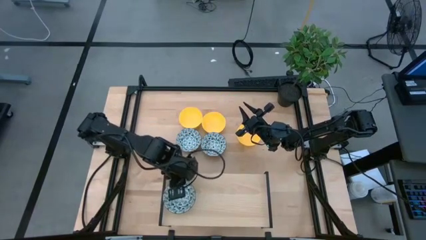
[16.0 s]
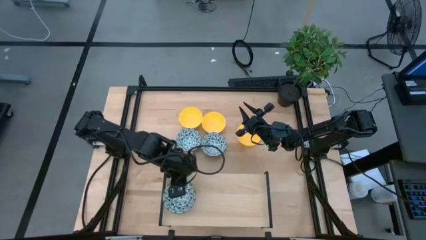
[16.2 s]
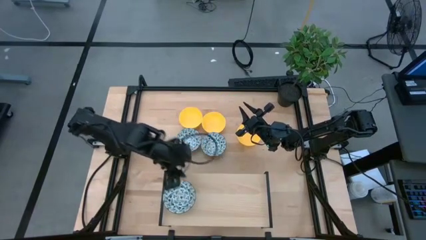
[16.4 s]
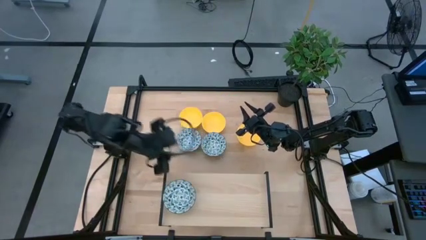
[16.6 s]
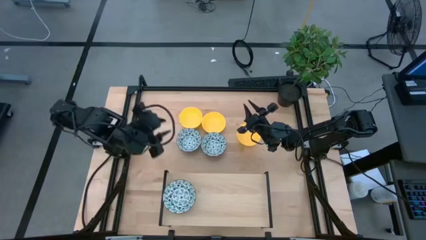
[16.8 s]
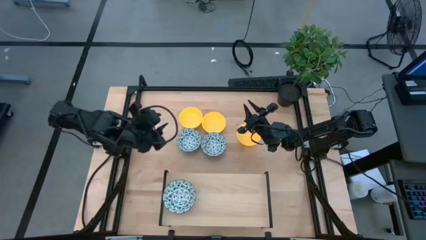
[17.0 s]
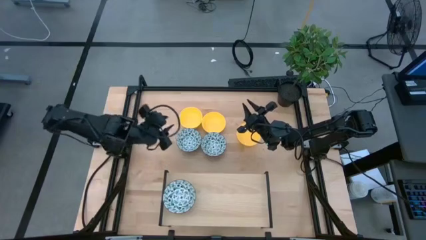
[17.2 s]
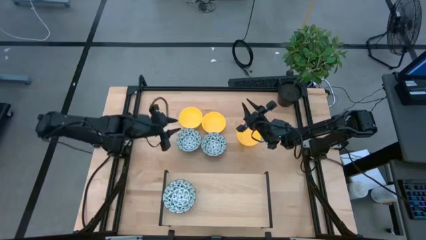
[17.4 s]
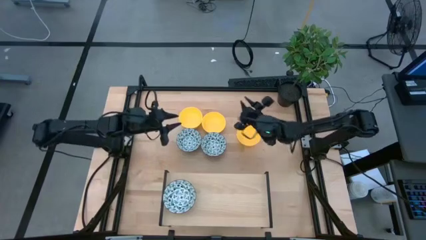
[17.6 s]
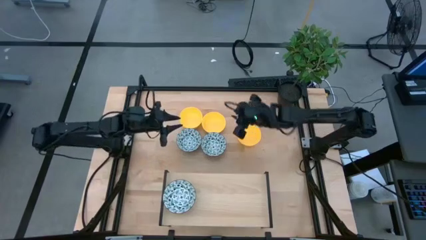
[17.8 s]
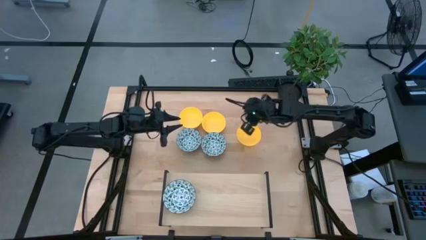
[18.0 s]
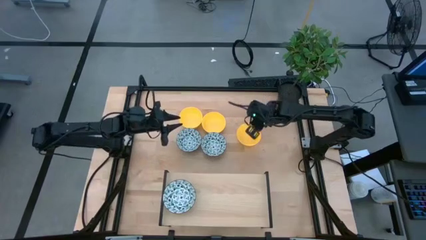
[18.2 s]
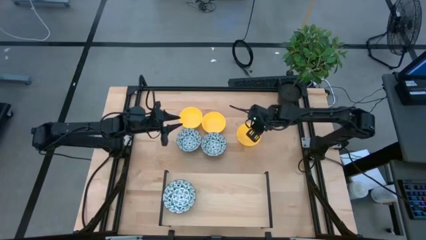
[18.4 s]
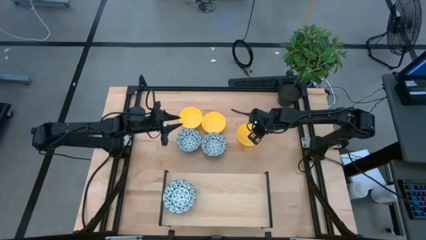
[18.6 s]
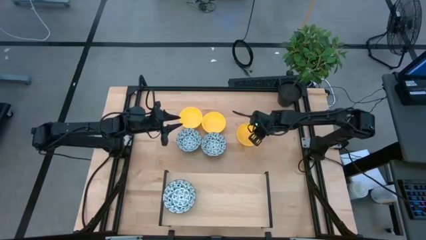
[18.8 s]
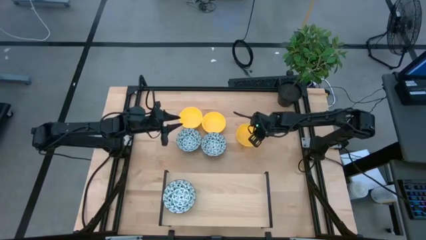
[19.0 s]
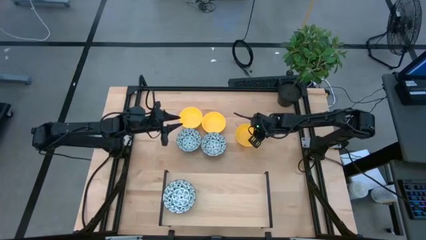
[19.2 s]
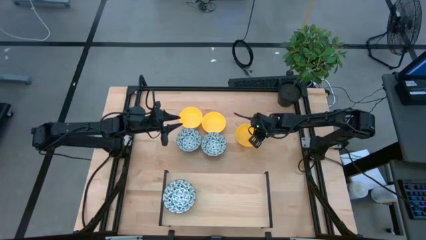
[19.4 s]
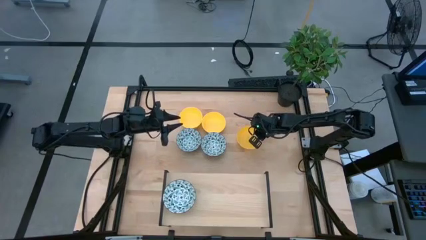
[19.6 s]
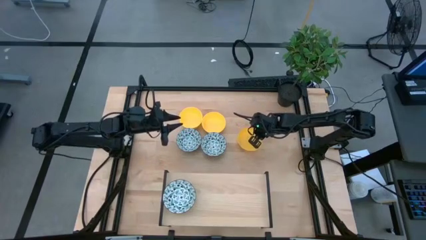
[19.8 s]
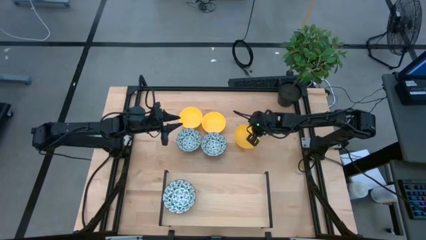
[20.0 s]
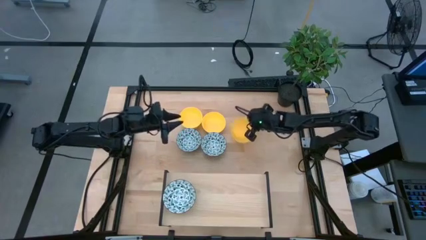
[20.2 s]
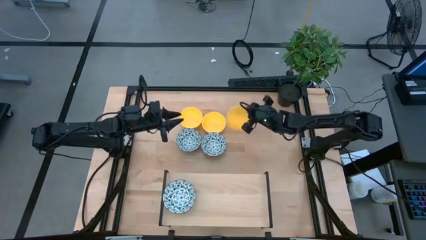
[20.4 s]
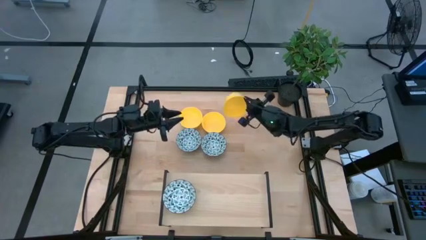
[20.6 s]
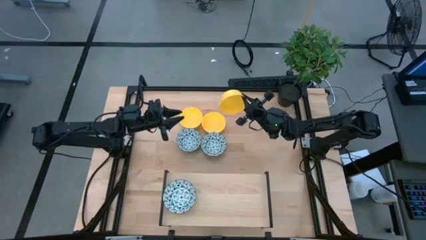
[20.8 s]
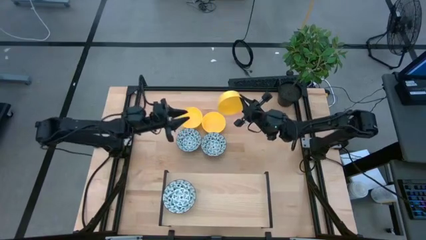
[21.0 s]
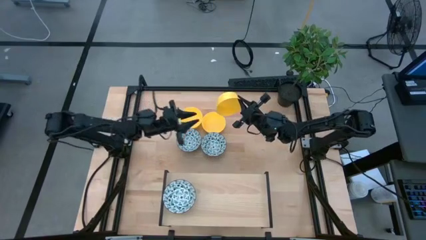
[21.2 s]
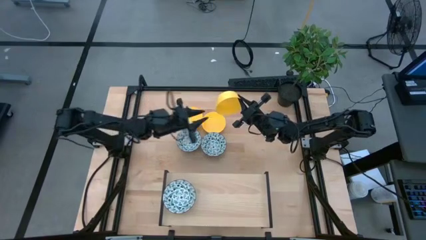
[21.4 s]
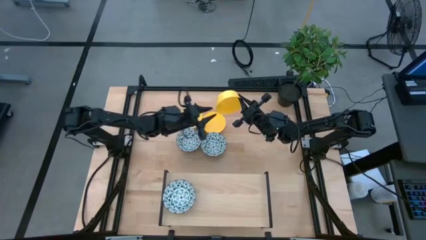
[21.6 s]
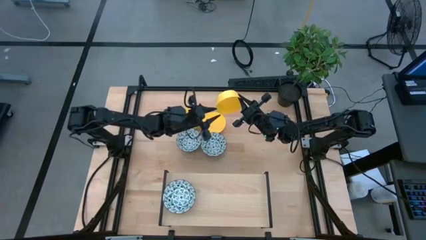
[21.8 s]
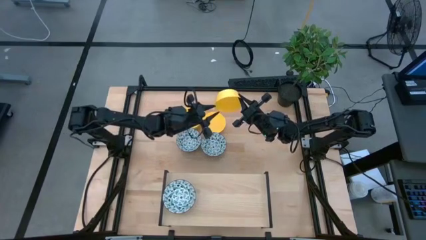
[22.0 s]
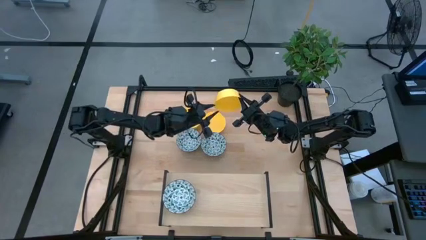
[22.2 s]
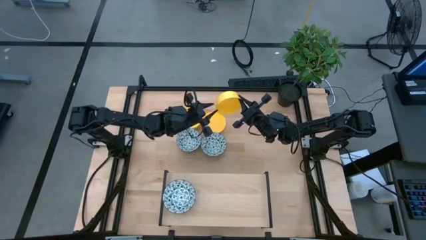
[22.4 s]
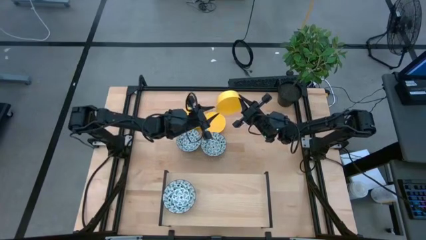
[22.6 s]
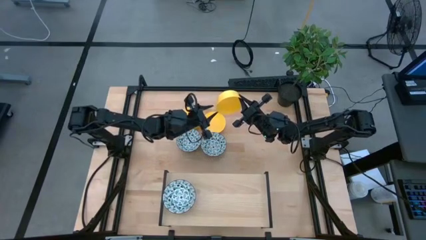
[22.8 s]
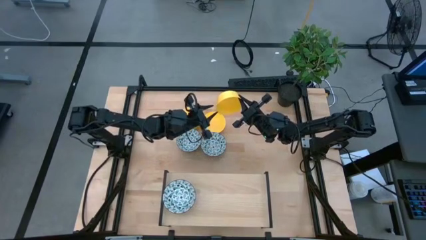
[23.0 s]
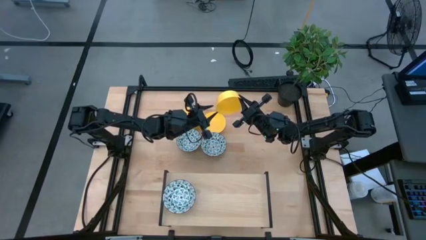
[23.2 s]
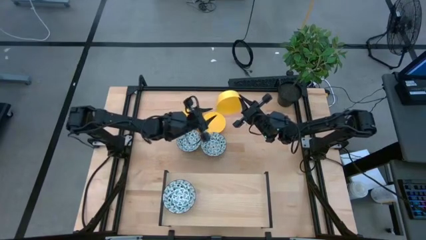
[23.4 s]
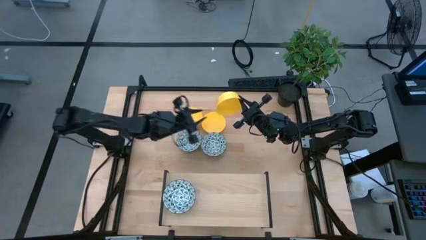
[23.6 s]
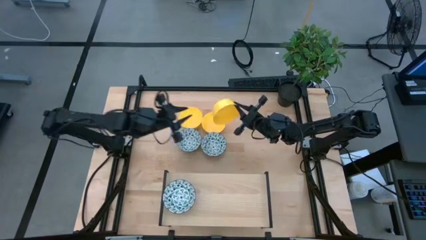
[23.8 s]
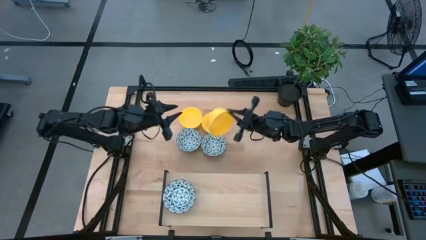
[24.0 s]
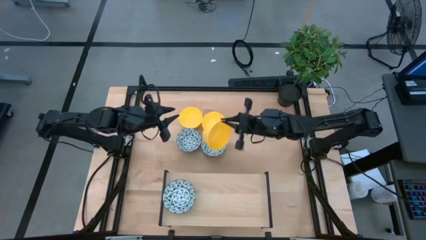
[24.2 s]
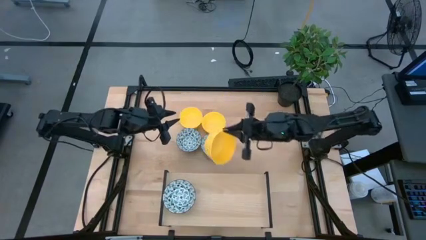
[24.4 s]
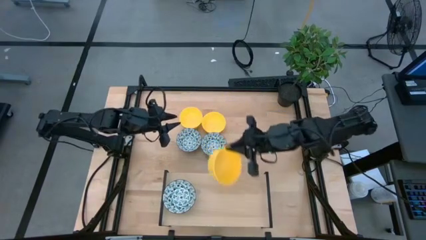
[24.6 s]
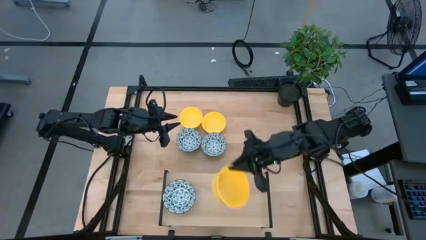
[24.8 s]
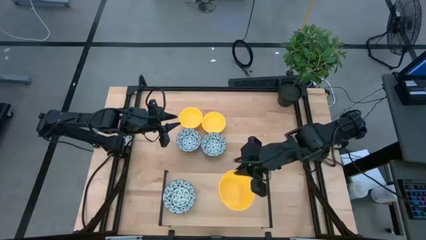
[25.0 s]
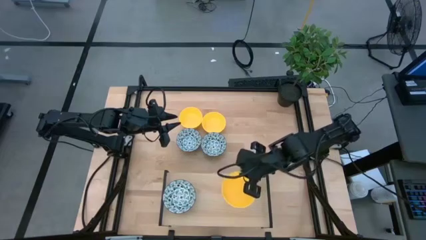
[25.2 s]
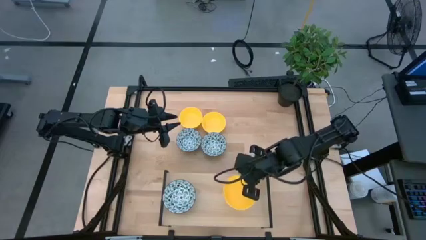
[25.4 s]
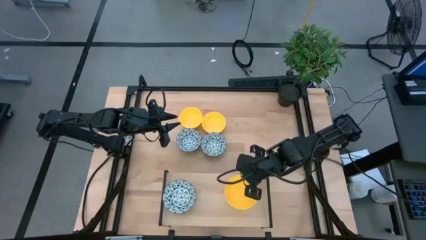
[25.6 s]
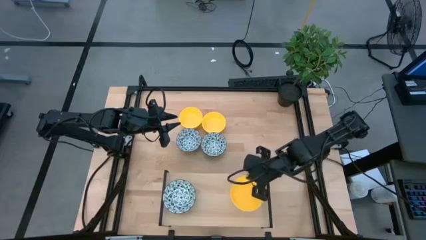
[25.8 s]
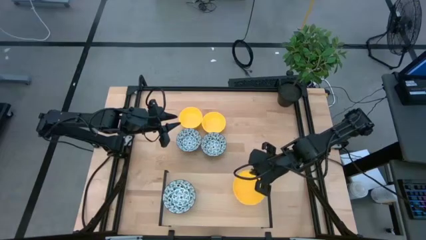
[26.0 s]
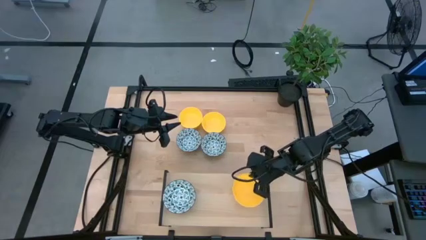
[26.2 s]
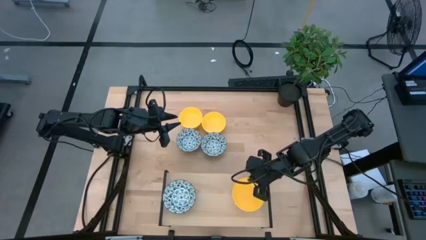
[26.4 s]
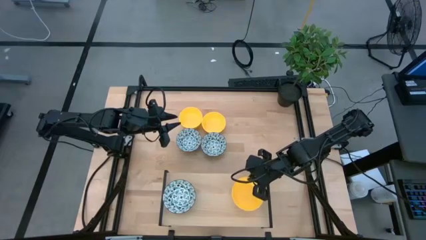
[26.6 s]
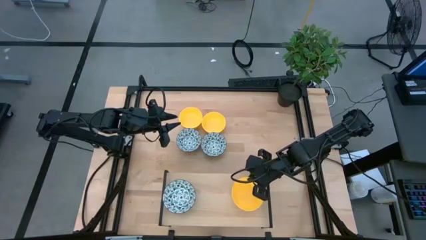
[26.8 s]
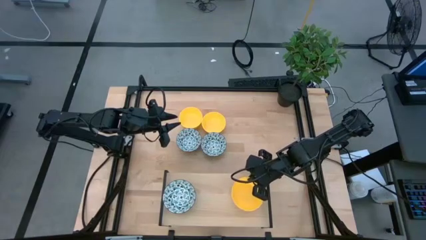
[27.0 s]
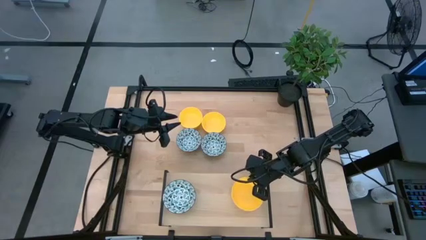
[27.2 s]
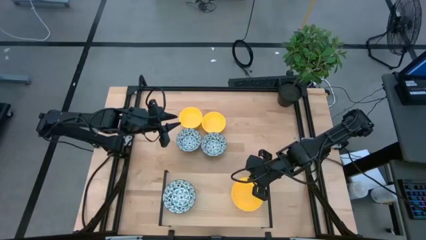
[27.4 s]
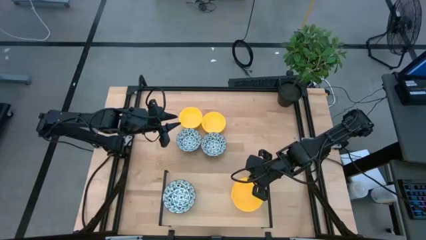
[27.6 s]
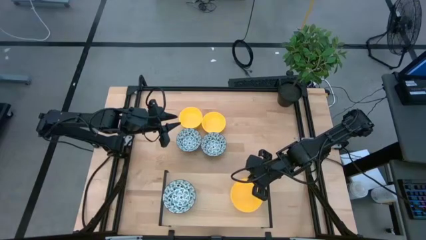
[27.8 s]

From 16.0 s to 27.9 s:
Task: Pick & Place Mini bowls
Put the right yellow bowl on the shelf
